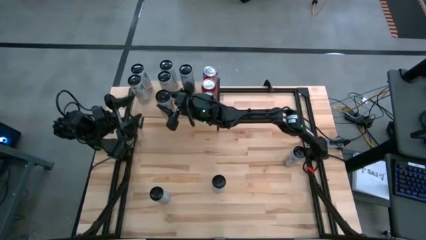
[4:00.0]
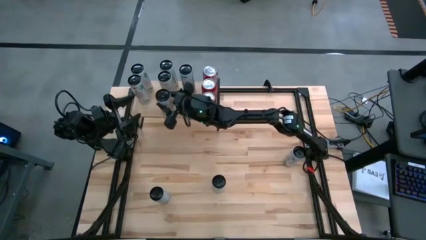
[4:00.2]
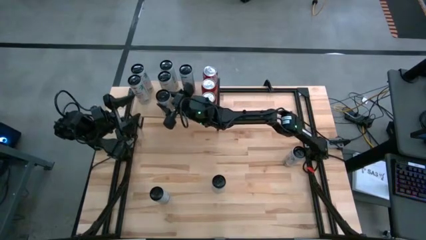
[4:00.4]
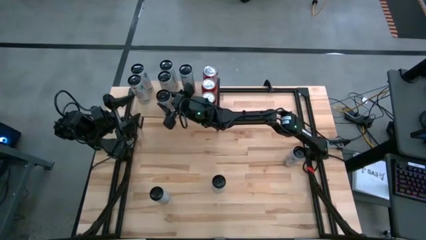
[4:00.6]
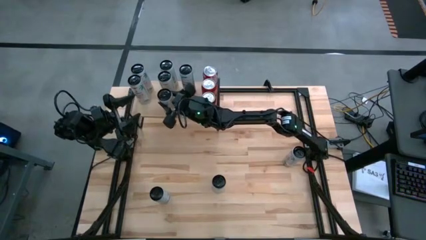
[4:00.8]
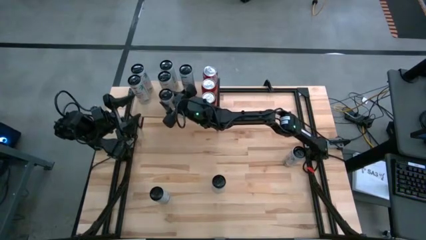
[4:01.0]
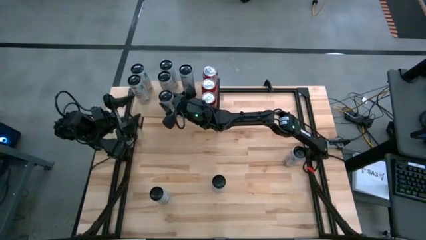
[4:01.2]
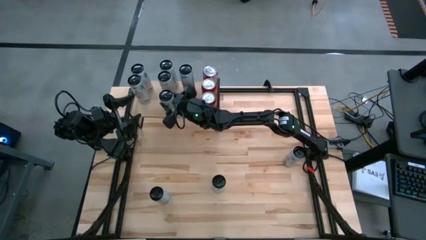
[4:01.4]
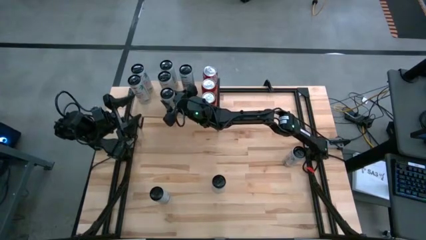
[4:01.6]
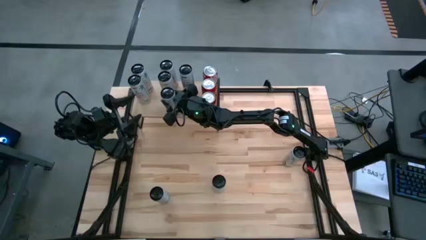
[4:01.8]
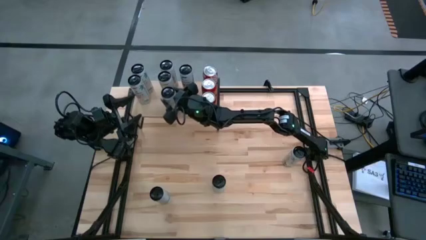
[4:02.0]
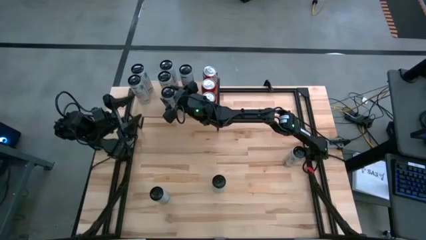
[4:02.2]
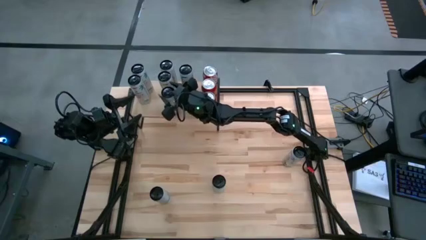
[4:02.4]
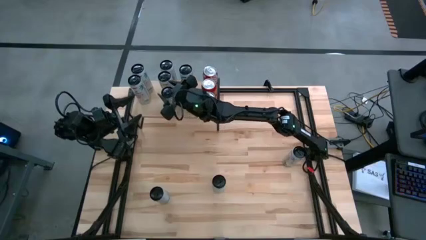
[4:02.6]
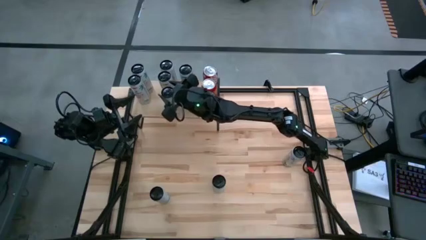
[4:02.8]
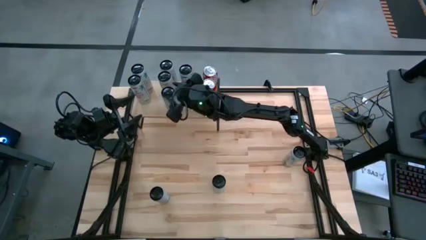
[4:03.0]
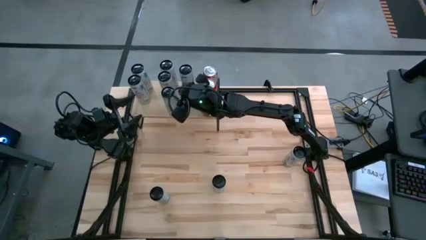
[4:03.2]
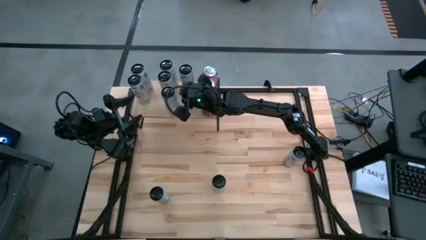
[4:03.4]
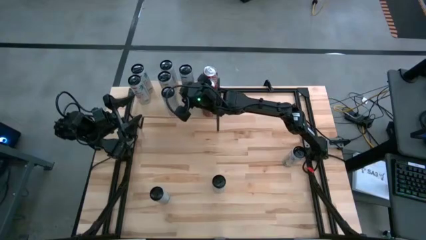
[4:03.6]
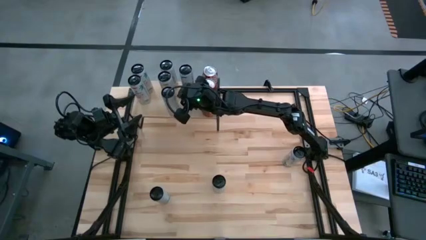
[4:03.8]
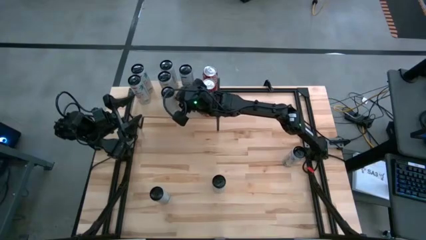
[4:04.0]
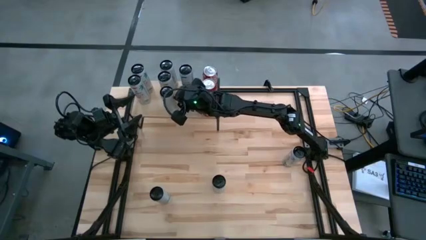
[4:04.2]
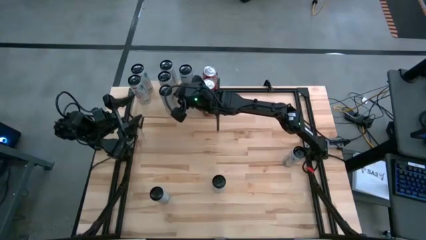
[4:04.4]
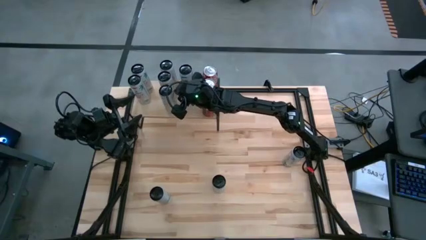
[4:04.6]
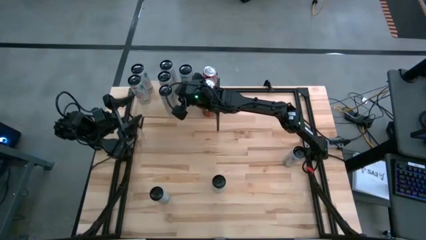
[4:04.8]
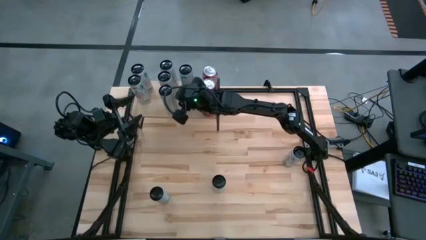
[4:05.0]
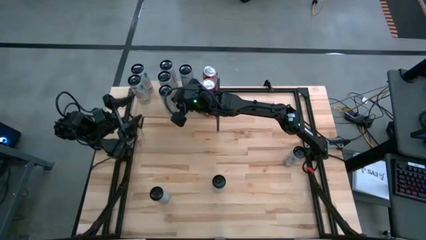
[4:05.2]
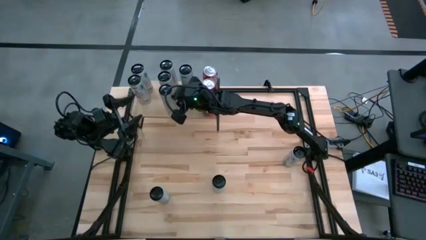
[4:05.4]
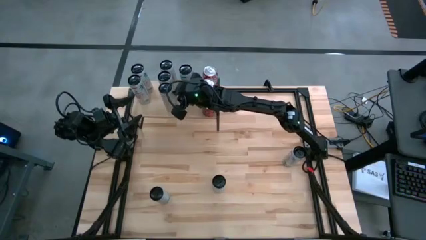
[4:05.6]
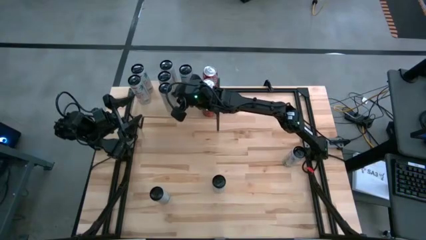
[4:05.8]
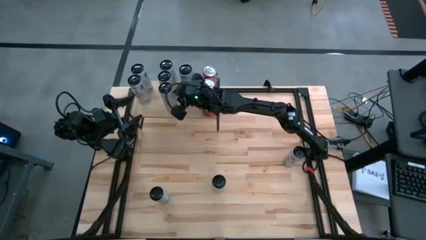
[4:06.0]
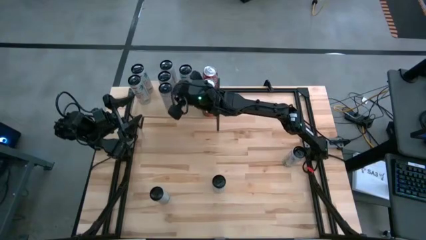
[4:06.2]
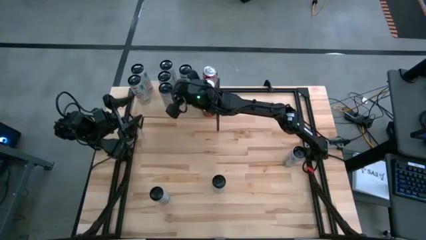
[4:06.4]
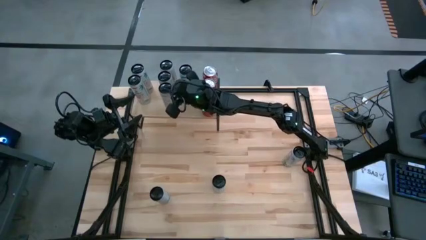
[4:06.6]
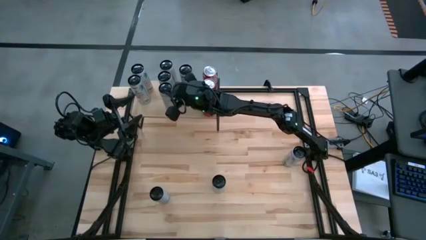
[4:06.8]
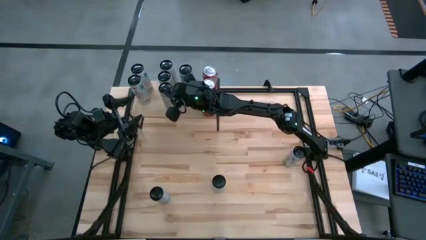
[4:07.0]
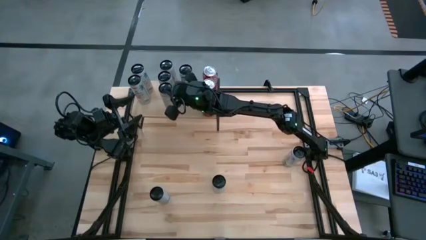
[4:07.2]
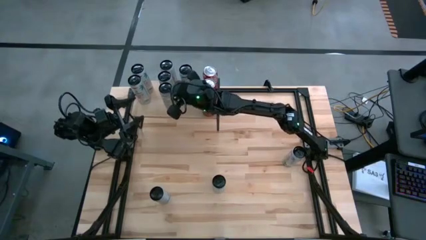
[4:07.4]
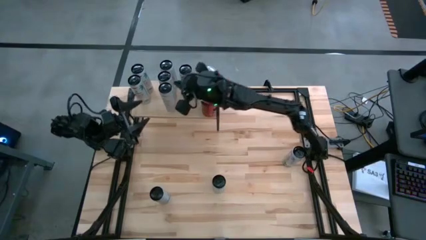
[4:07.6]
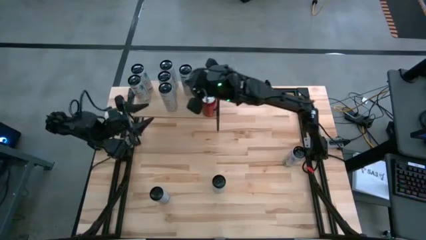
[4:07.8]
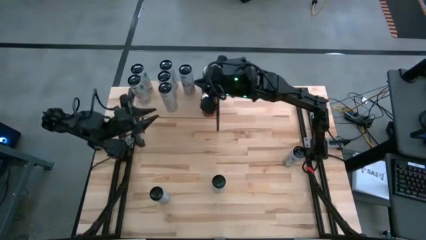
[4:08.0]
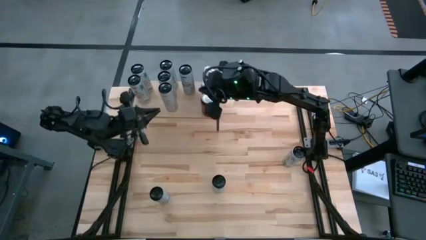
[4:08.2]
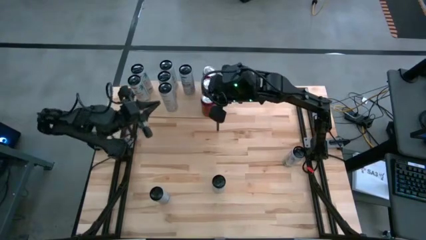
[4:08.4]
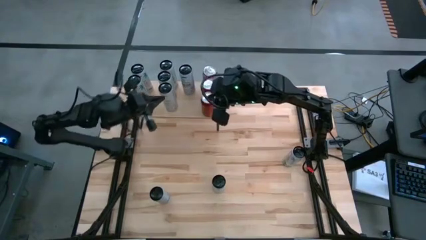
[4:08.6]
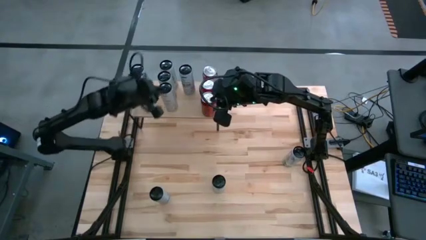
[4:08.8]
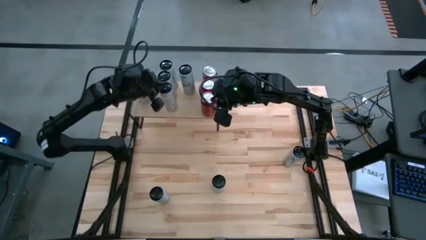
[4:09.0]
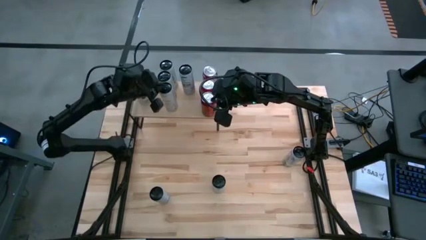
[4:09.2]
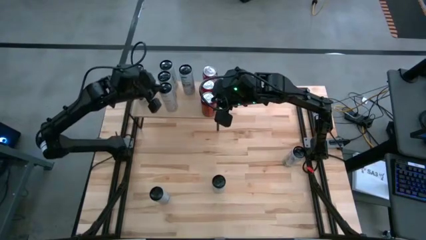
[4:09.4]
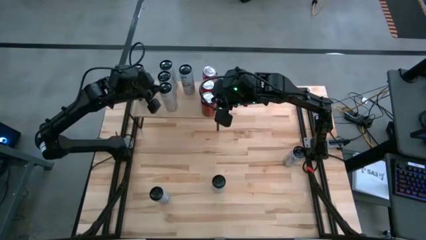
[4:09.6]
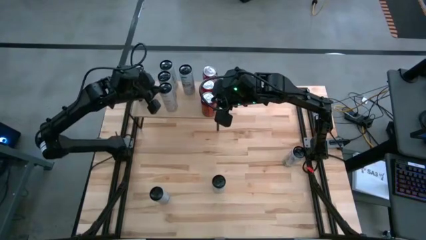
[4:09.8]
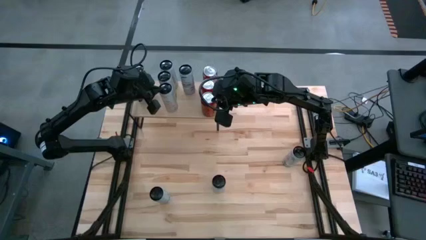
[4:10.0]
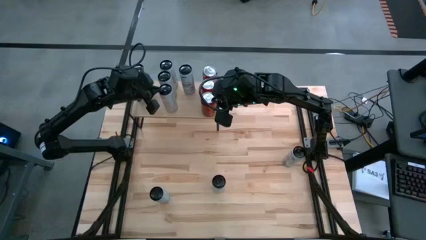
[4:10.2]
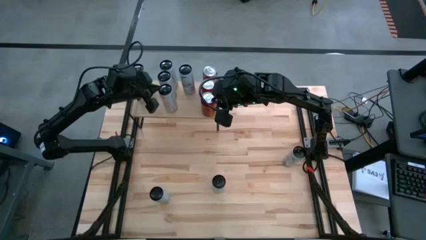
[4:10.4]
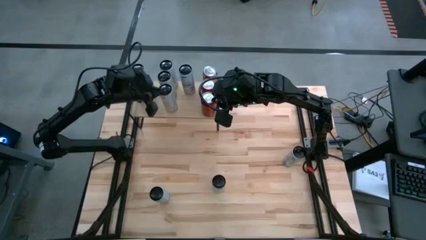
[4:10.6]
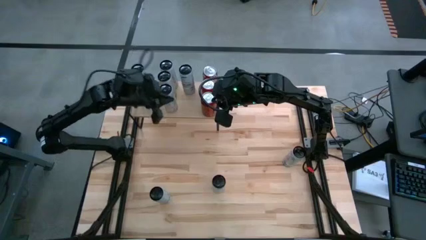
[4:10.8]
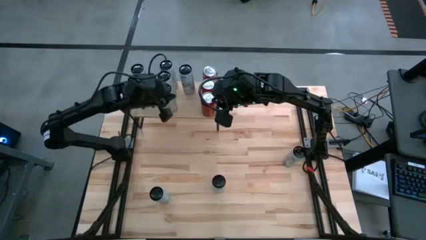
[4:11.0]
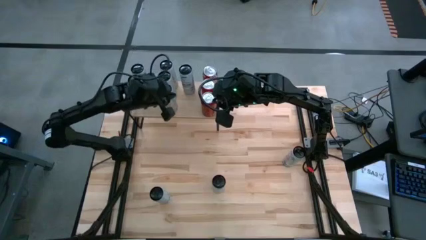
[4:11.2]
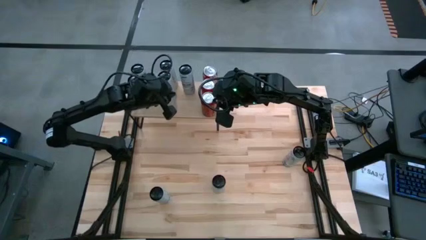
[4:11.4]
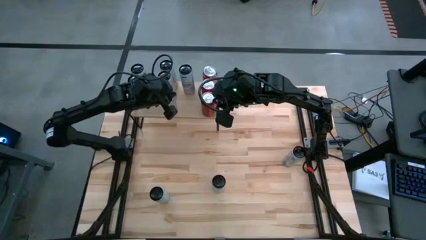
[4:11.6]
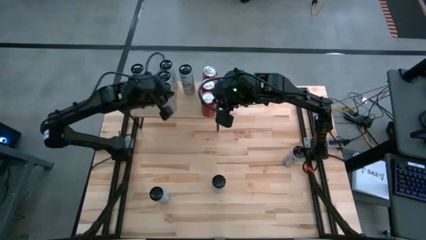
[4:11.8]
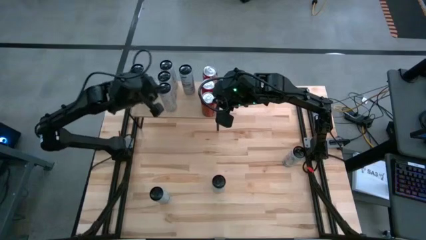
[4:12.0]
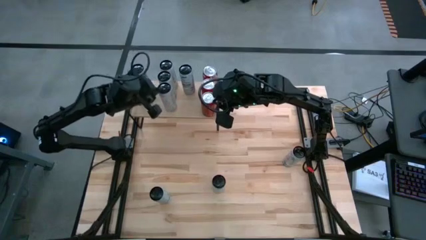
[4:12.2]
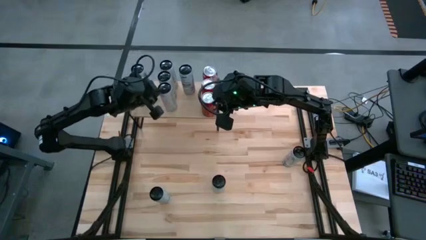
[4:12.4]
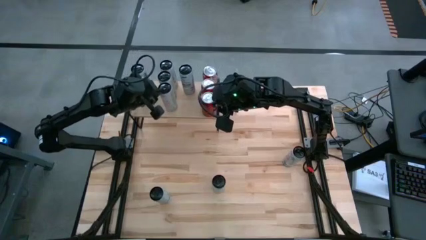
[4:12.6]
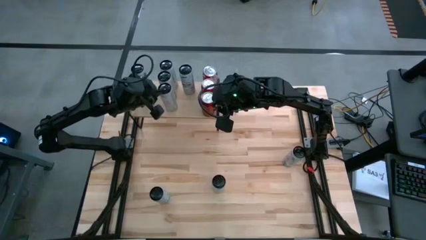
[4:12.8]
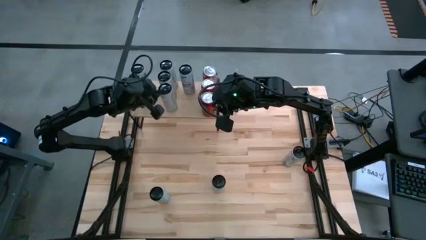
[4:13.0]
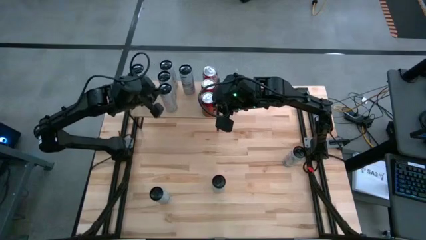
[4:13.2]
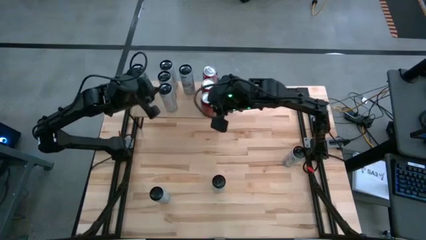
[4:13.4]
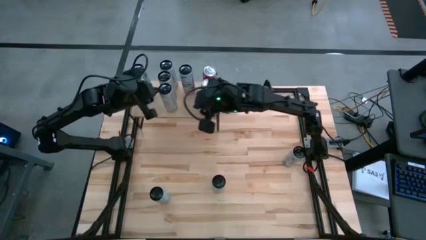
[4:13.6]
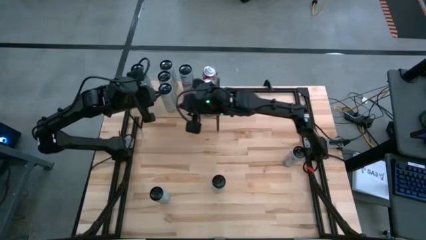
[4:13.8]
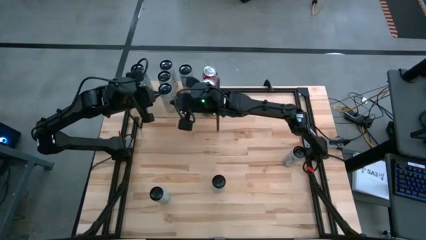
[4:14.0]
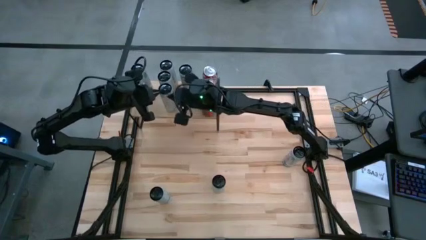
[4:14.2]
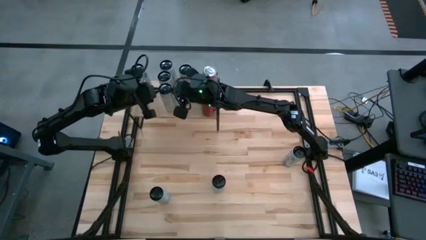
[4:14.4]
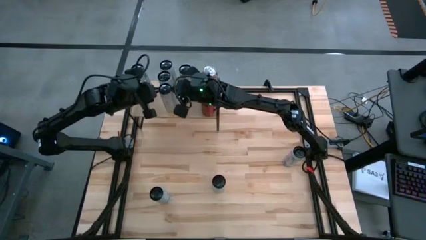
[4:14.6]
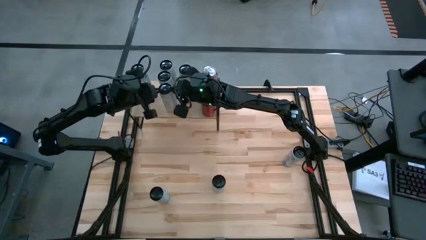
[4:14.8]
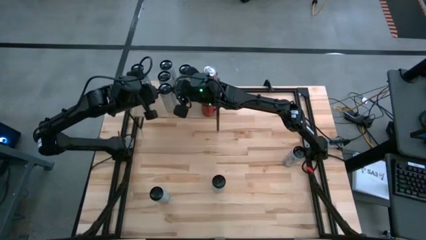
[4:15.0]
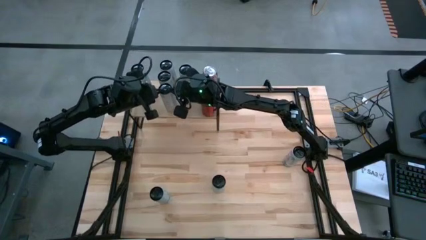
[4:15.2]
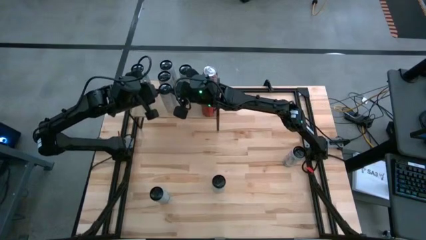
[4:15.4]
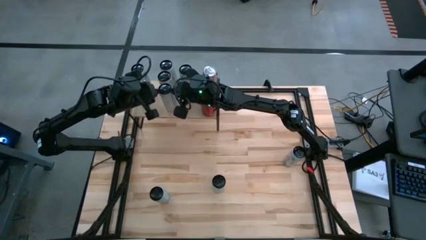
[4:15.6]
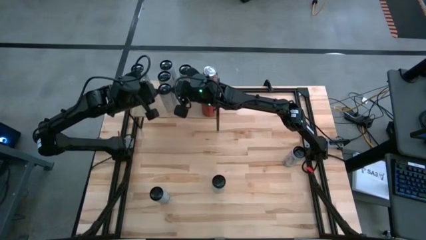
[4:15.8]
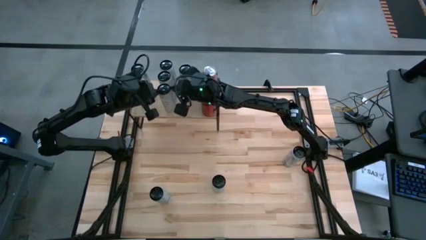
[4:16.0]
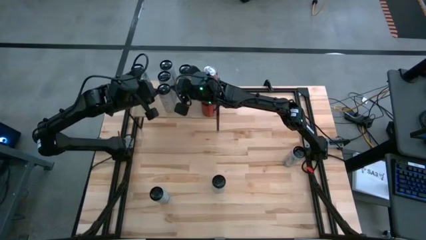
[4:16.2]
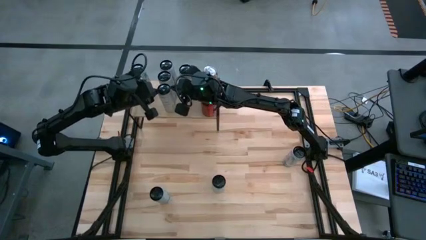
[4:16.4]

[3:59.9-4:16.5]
Task: Place canned beverage on shelf
Put the white yellow soda can on the shelf aligned with the other white yellow soda cans
